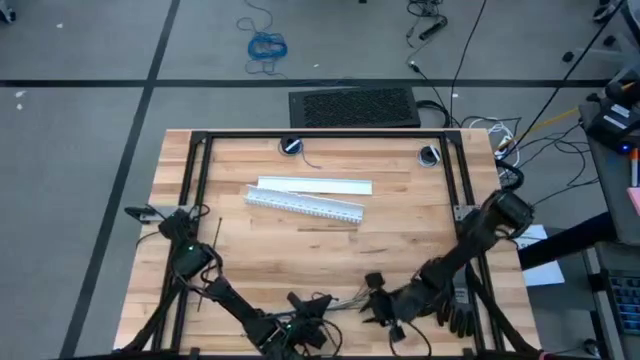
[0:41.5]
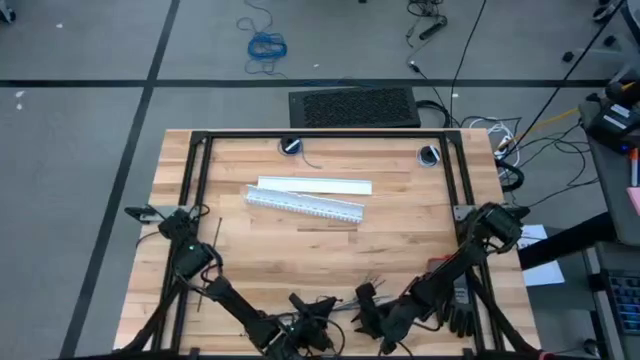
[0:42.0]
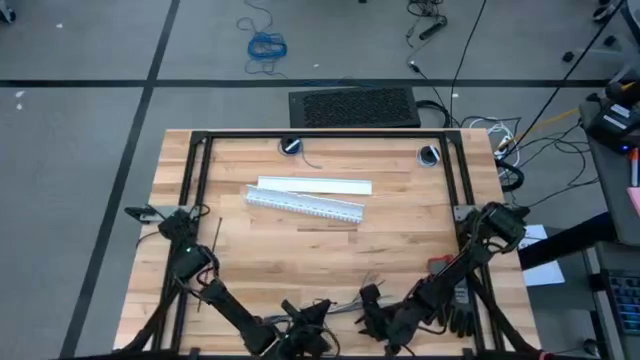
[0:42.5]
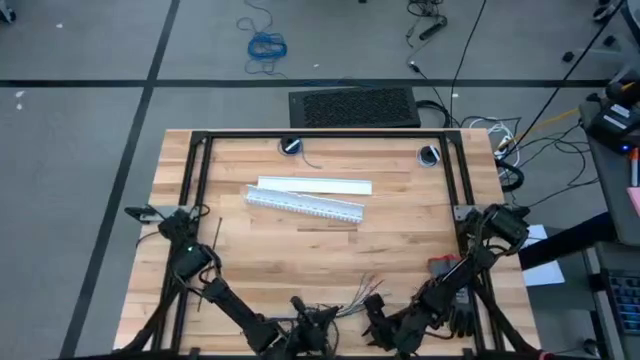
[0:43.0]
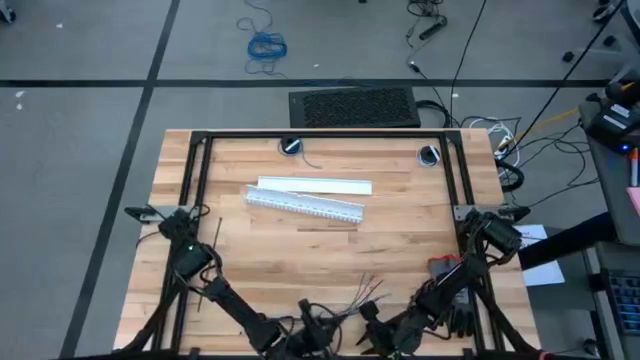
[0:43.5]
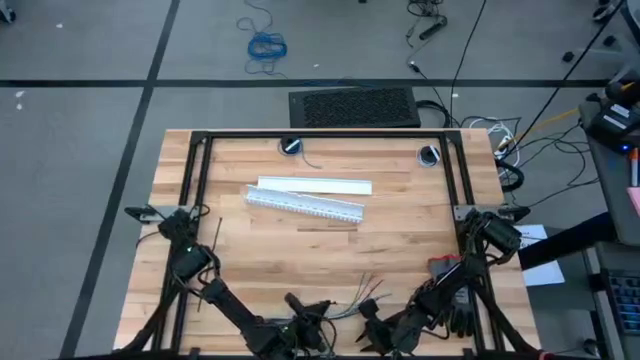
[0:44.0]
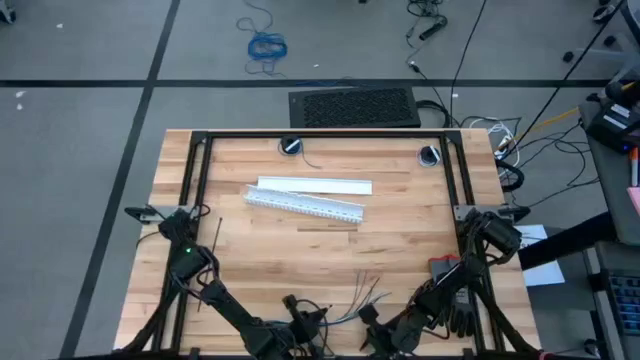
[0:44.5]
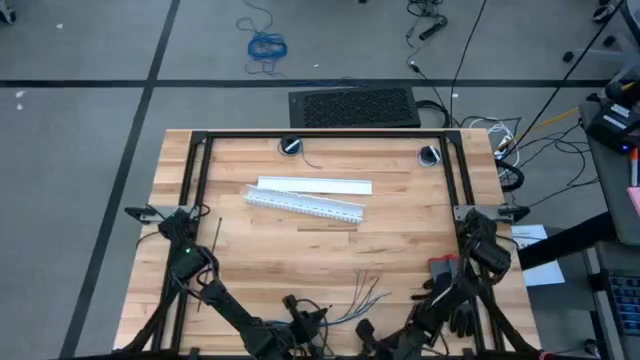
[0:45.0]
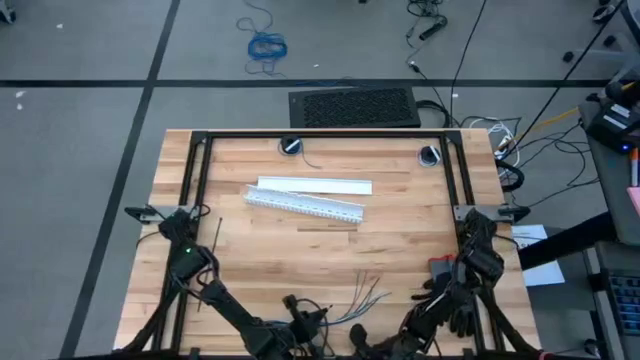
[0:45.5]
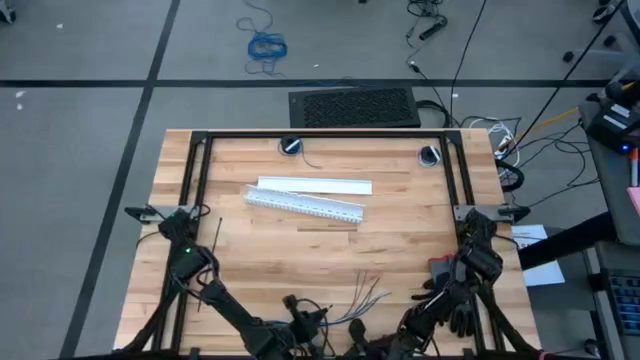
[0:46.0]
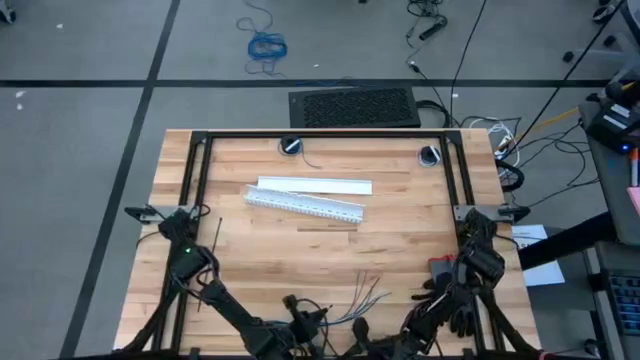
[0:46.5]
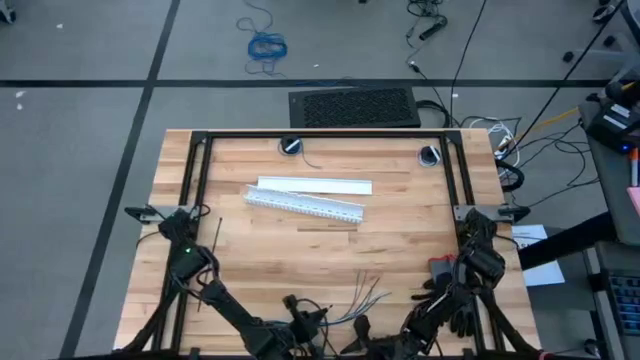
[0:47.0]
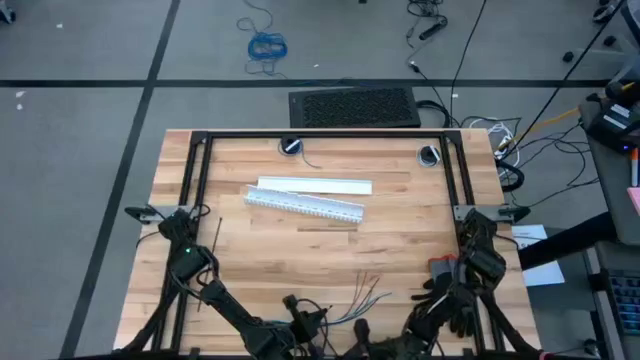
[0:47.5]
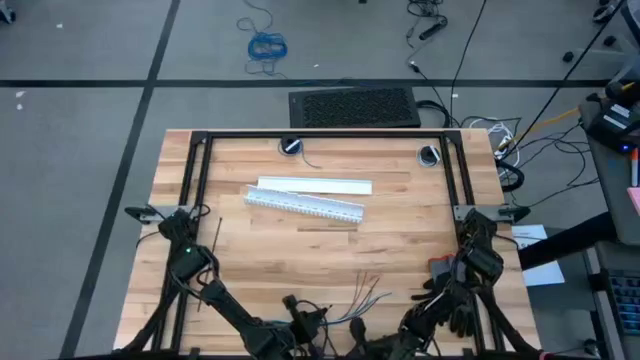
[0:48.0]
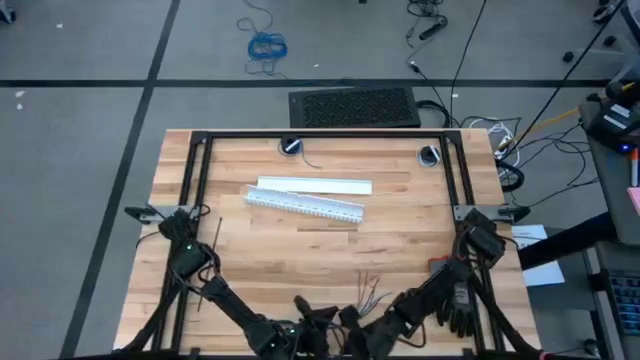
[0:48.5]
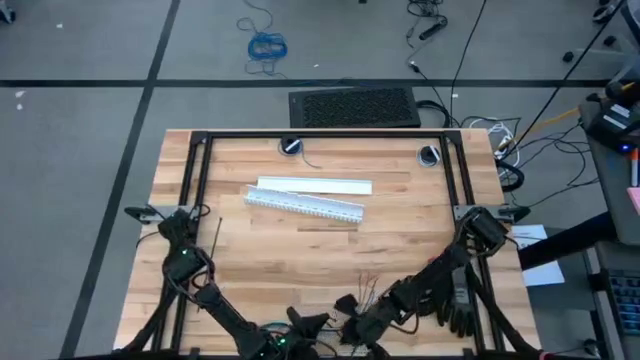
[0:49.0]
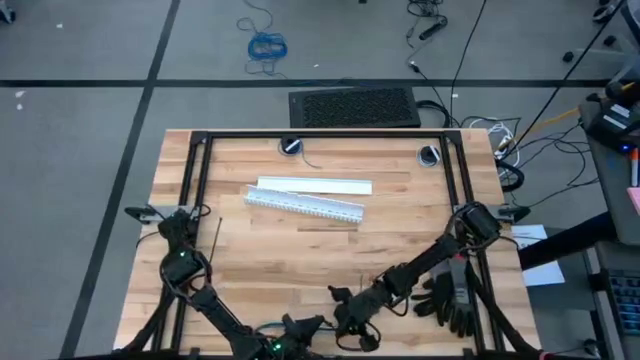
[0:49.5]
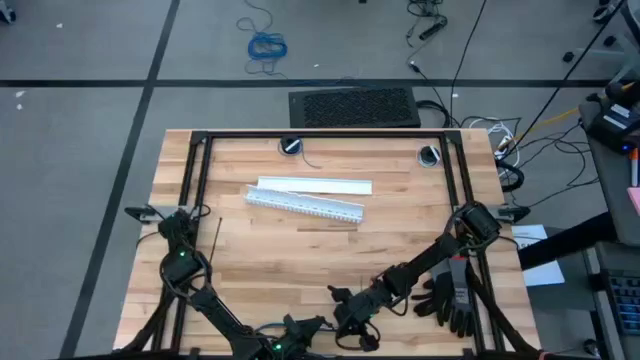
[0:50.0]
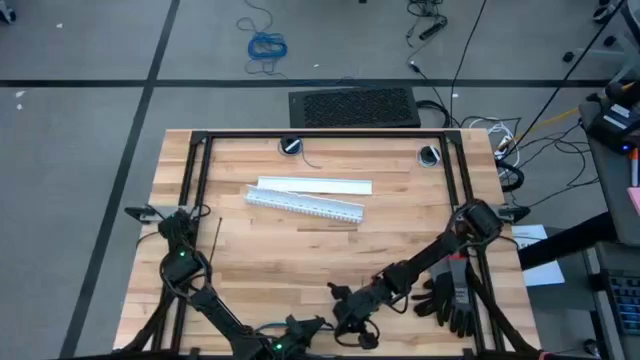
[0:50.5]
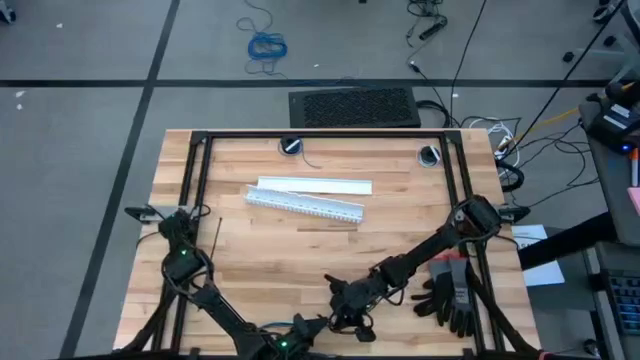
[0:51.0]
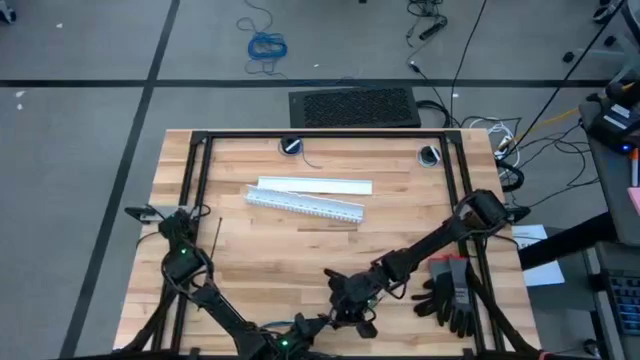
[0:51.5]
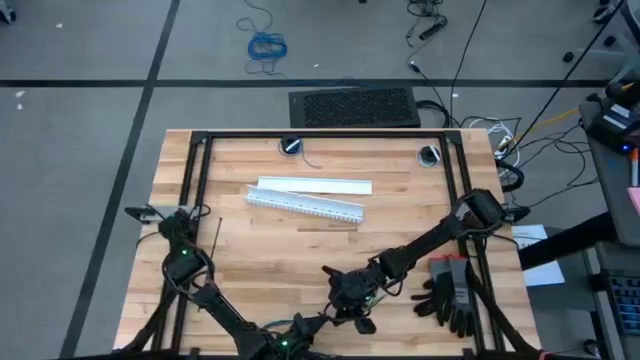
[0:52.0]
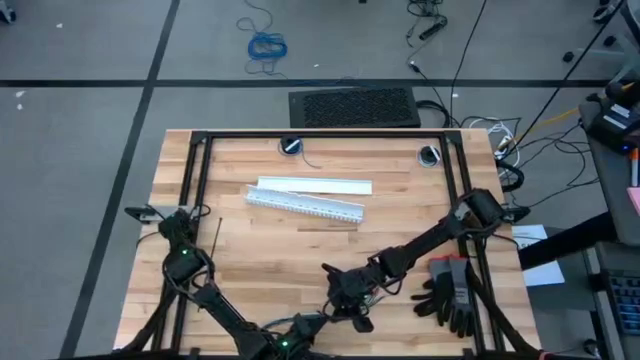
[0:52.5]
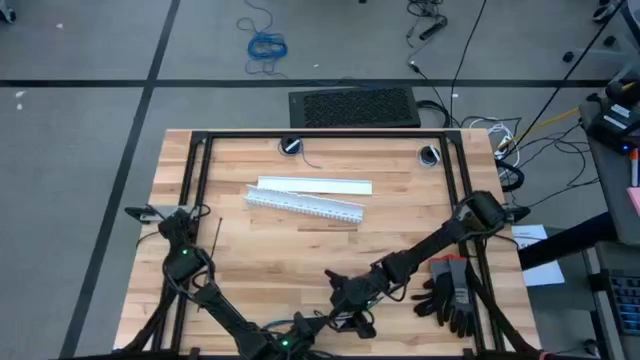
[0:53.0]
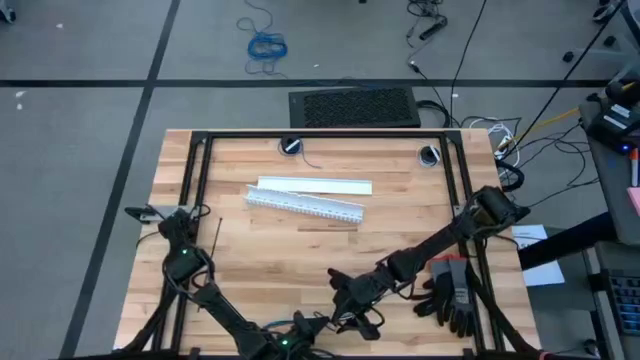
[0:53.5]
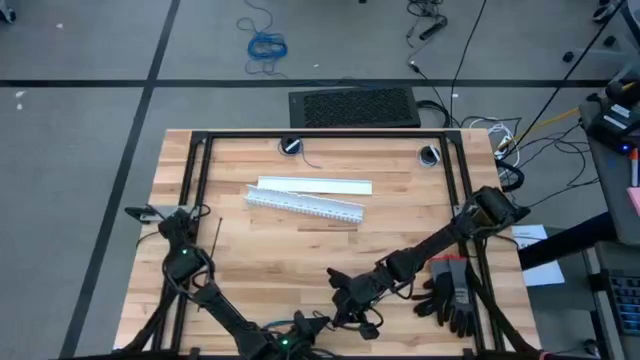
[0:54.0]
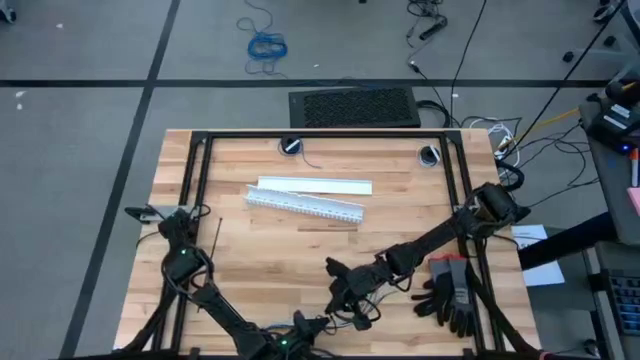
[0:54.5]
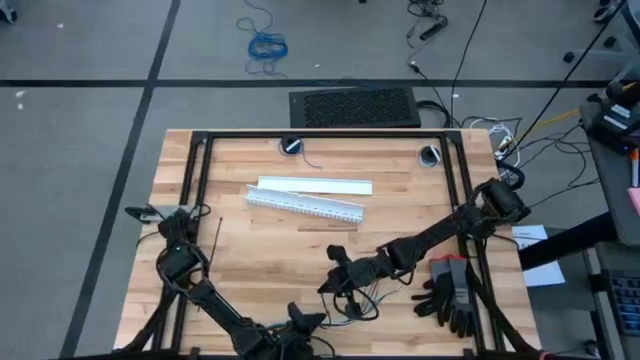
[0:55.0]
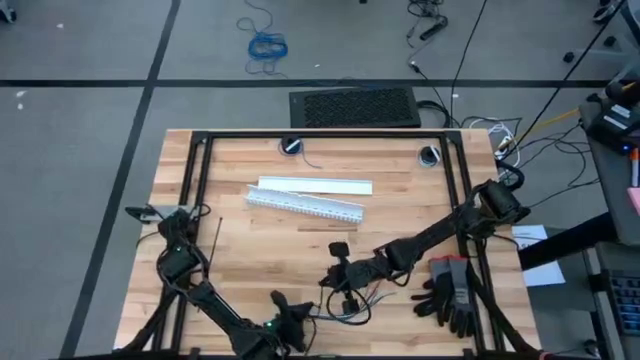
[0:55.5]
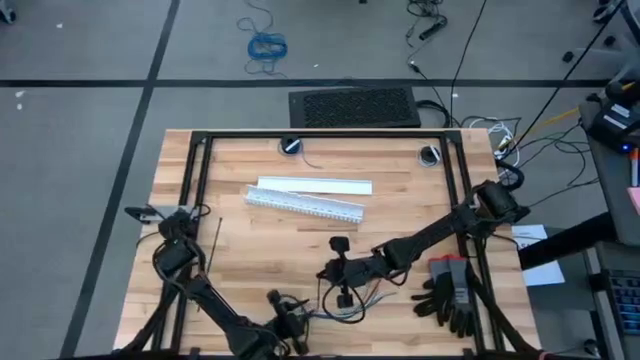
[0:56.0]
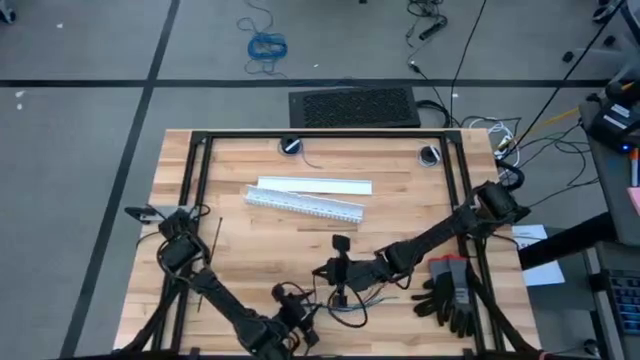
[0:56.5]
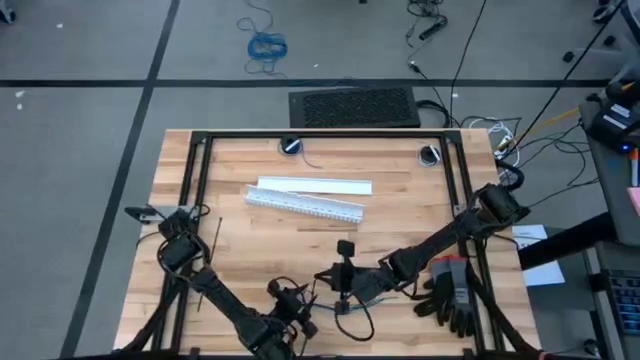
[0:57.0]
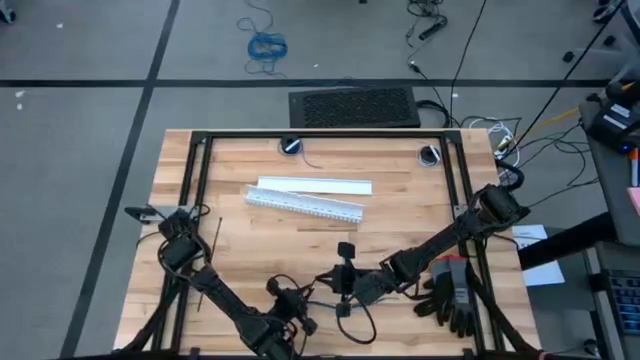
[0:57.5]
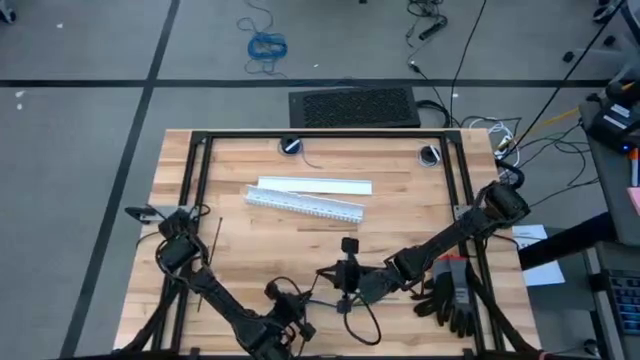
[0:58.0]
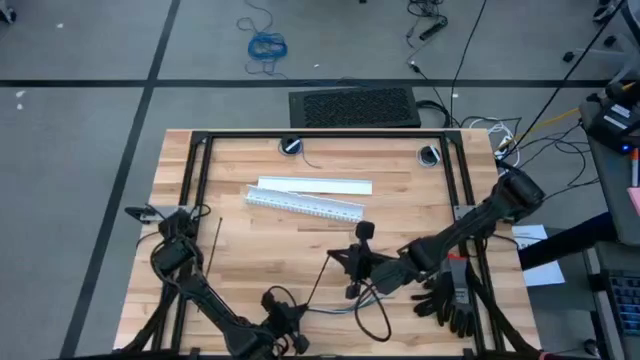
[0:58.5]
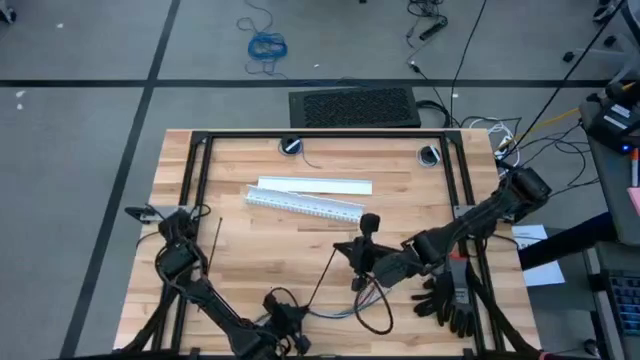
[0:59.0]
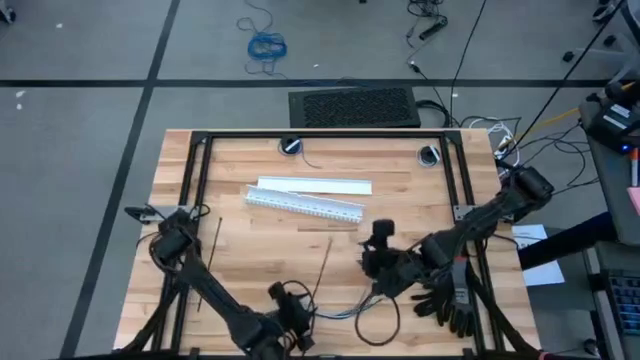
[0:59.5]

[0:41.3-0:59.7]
Task: Ziptie cables
Wrap the cable wire using a zip tie

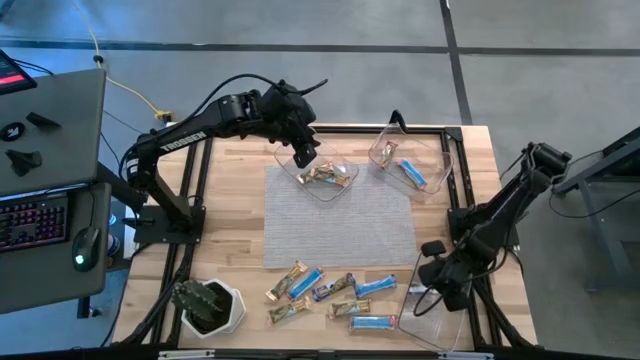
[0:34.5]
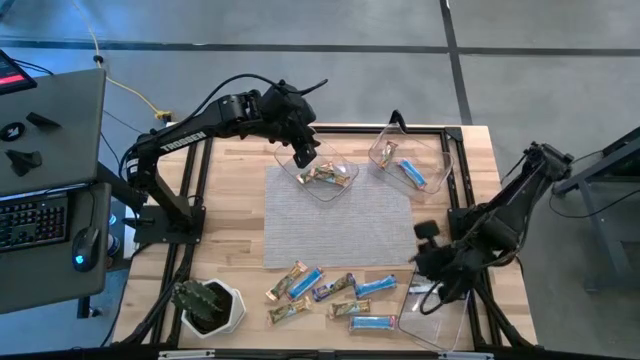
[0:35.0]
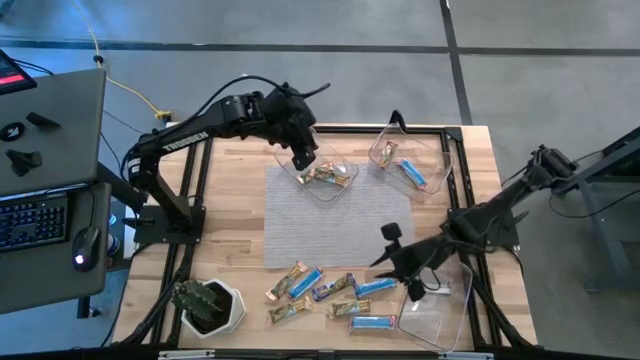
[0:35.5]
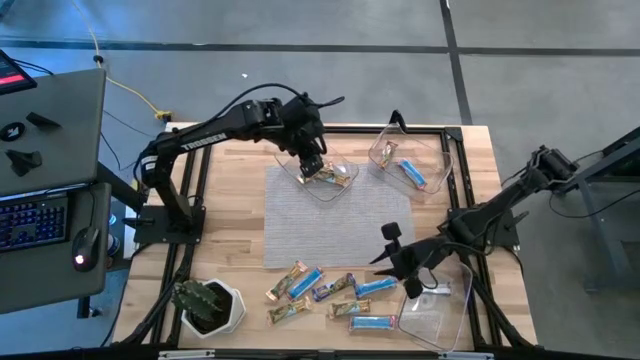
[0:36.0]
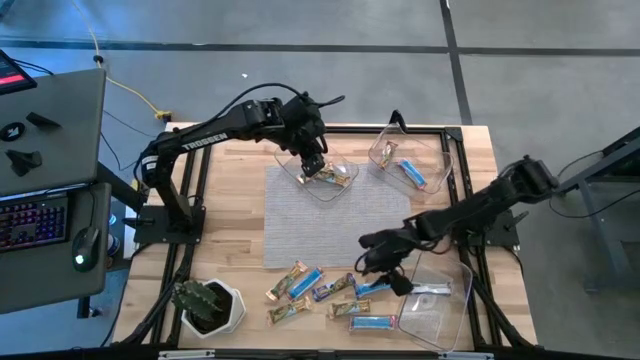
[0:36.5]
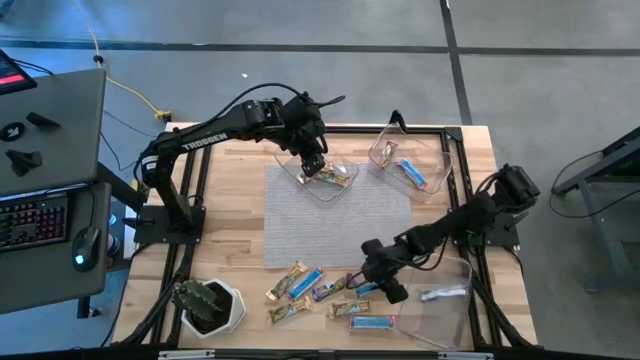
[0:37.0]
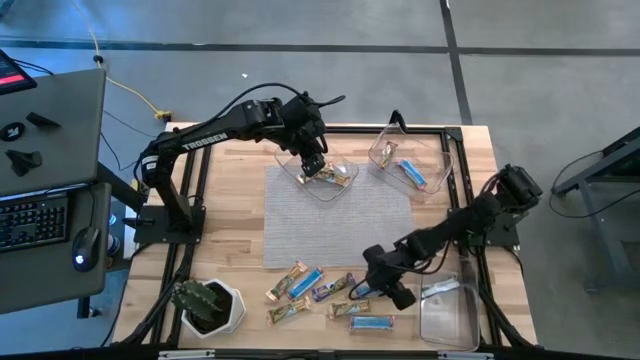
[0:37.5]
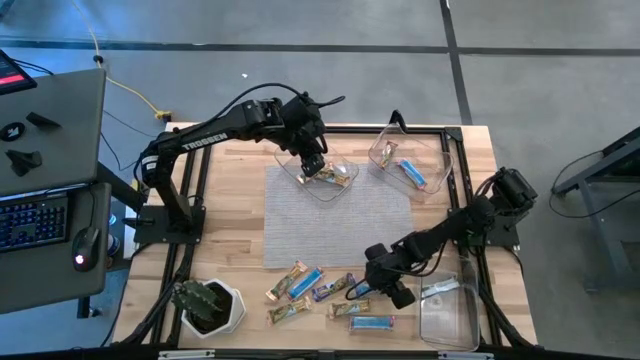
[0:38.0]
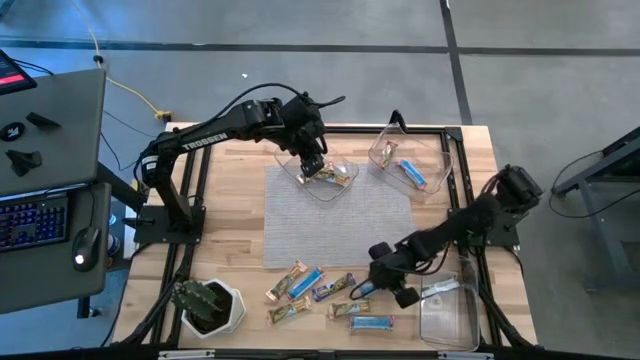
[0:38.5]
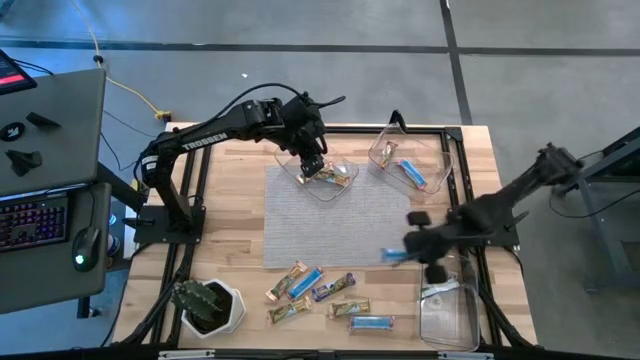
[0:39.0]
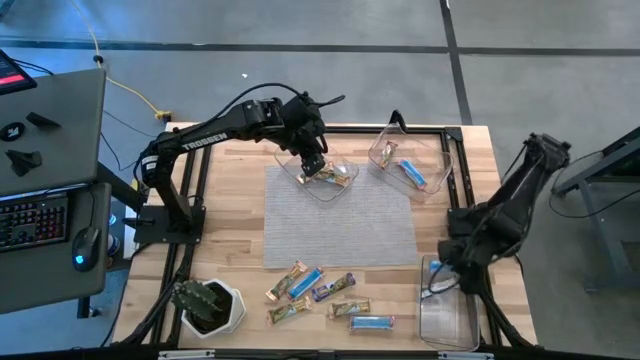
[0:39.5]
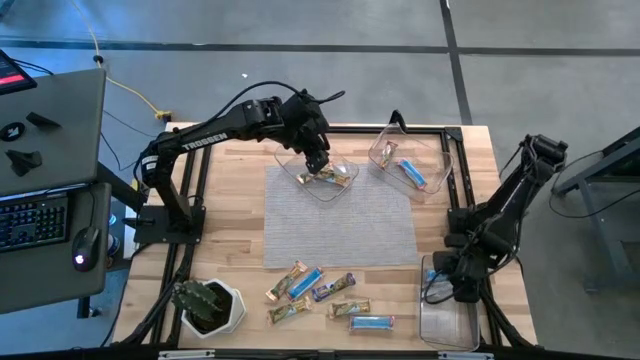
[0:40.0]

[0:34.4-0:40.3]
Task: Pick and place Granola Bars by type
Put the blue granola bar into the bottom right transparent bin
